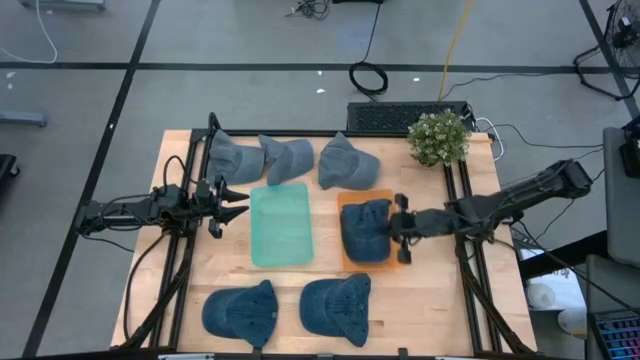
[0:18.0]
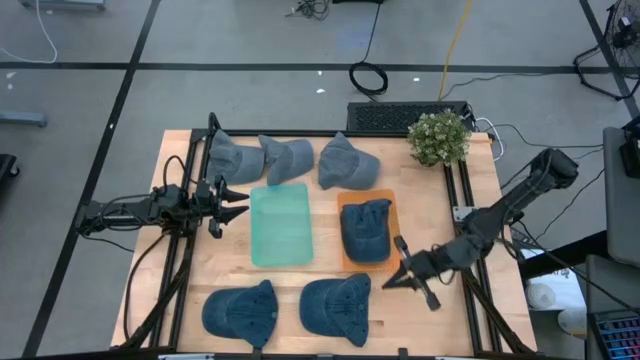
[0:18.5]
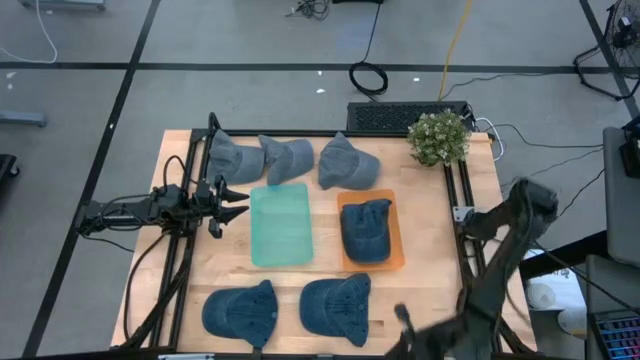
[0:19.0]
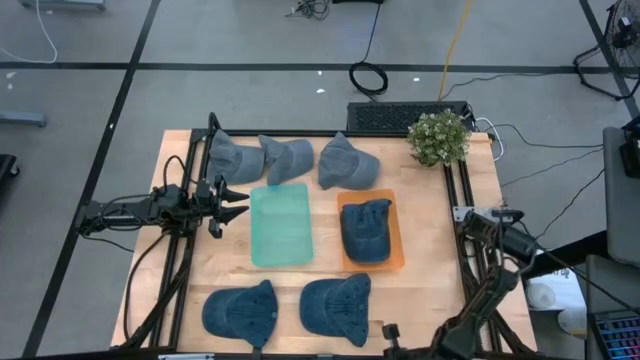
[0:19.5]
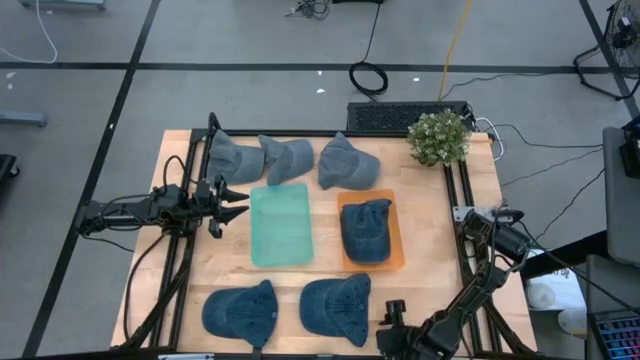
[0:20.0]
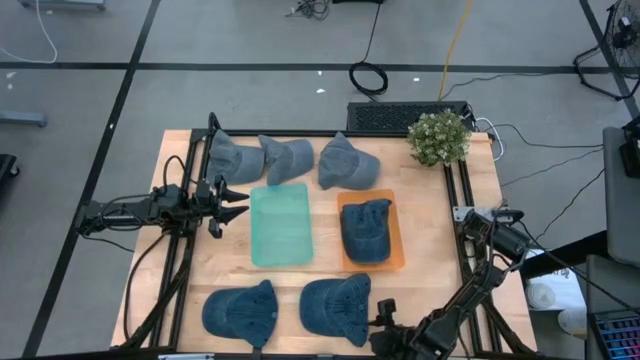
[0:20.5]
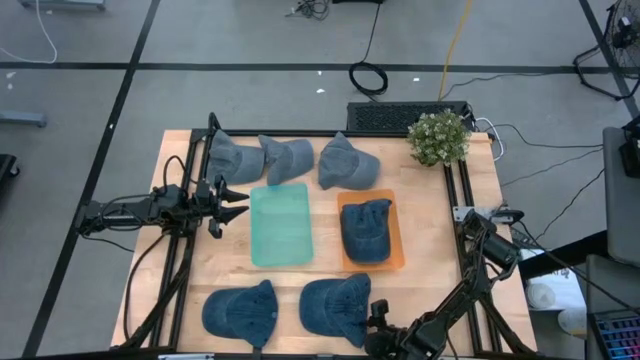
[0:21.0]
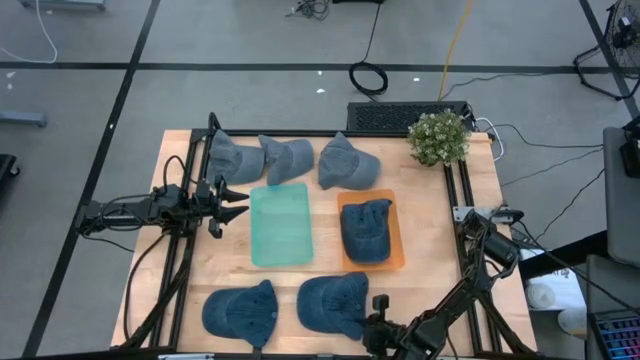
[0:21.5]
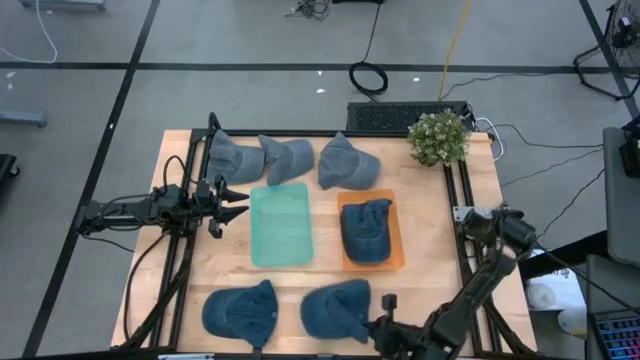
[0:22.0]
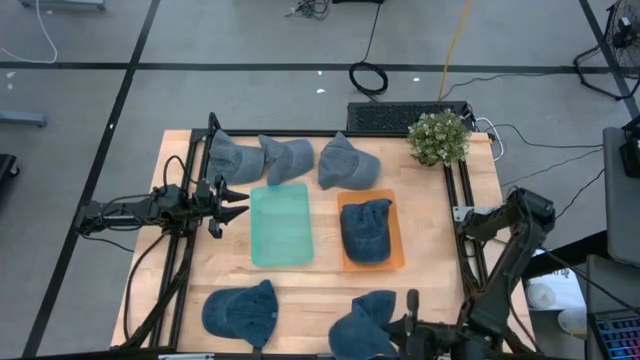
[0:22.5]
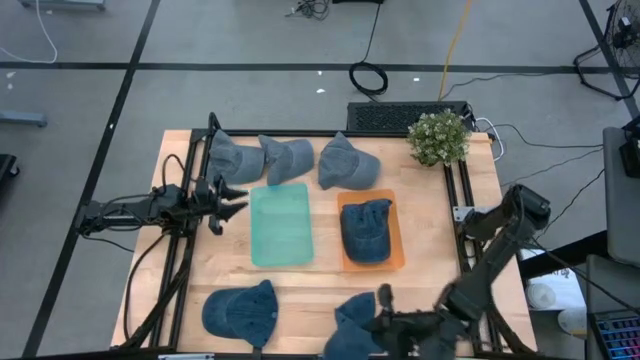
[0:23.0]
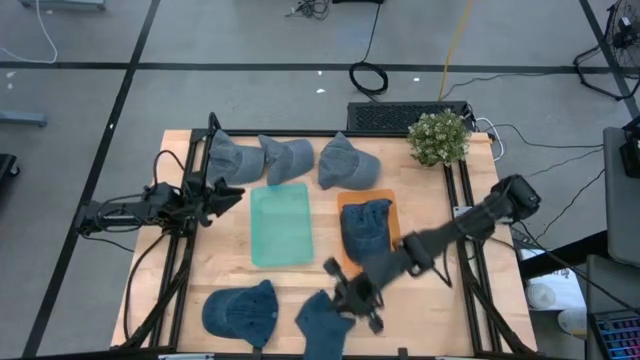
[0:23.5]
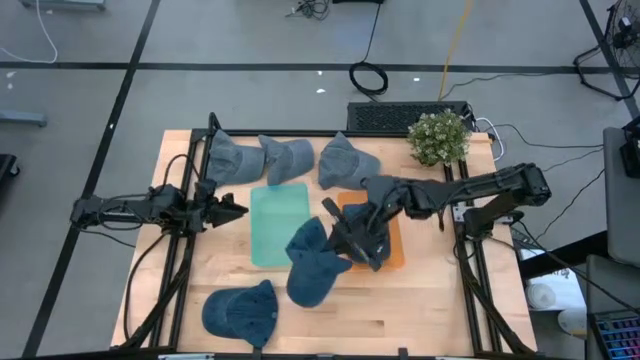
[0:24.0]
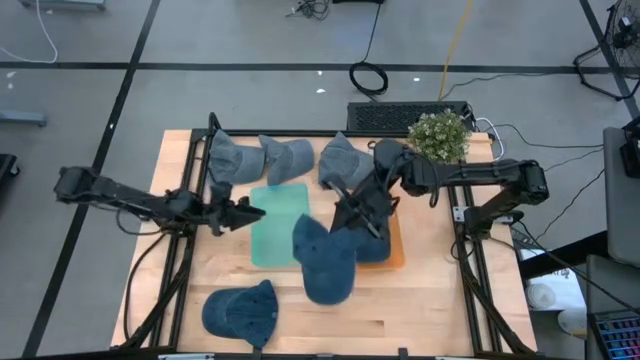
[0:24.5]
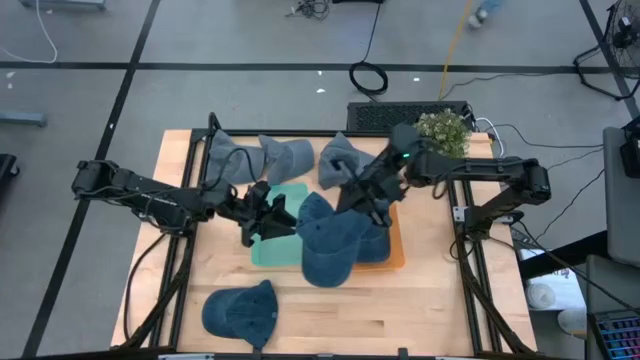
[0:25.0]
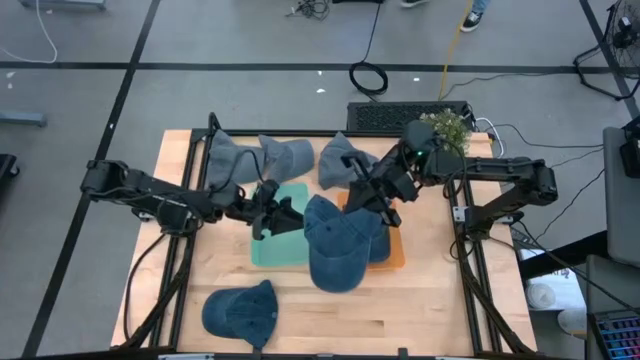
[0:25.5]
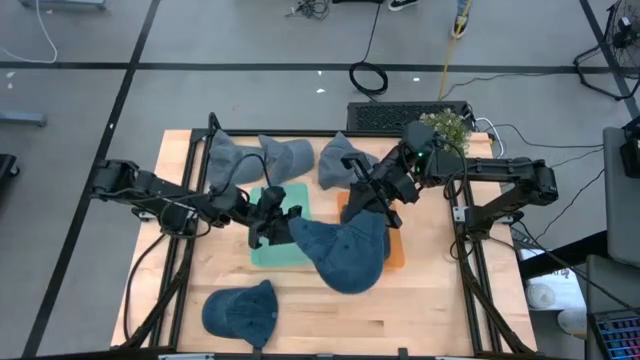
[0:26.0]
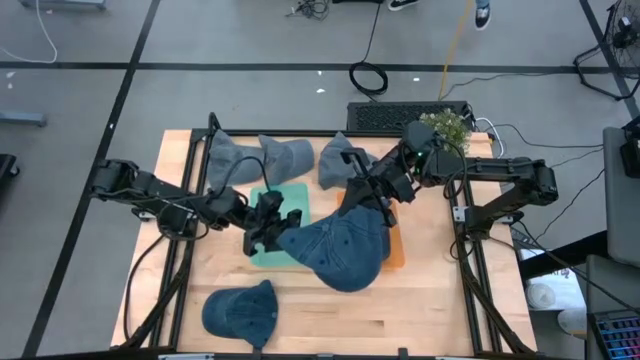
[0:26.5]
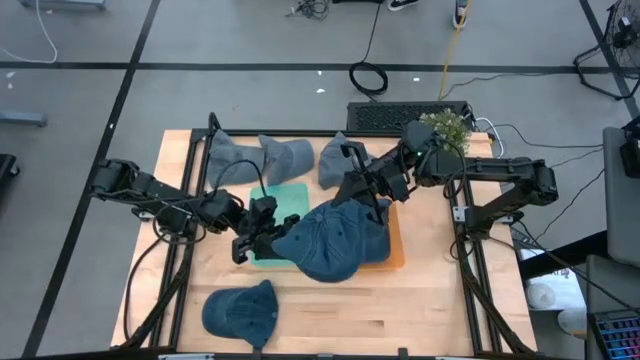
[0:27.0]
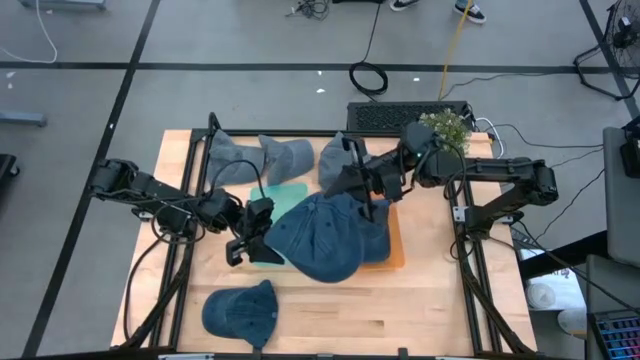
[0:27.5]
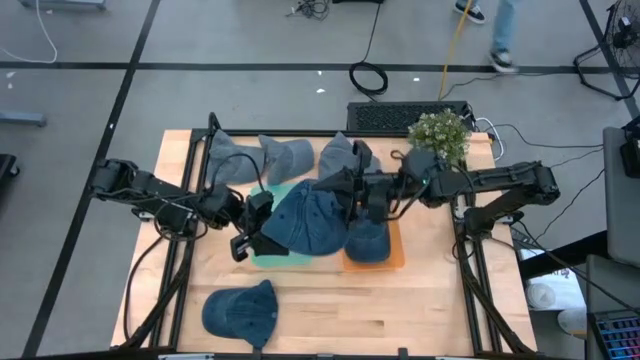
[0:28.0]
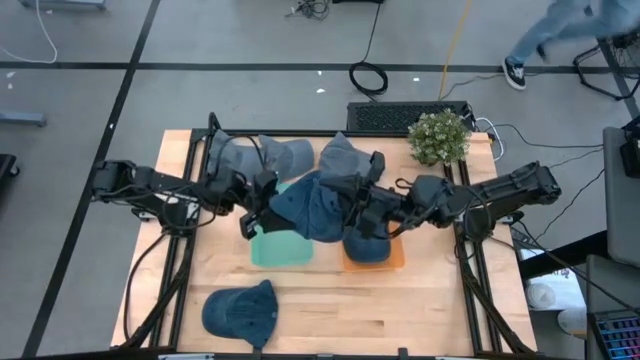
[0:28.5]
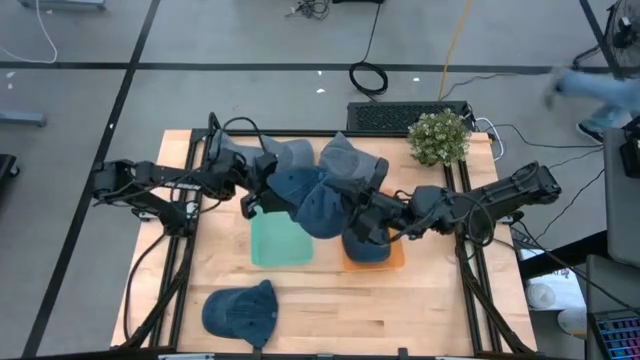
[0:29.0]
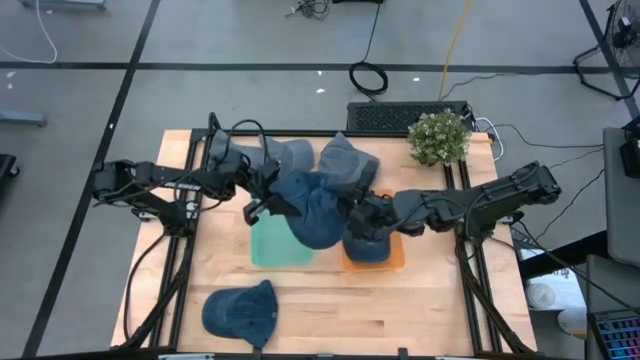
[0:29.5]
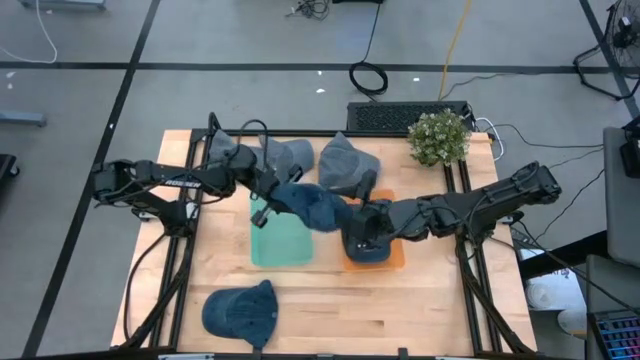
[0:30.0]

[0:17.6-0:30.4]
Task: Pick & Place hat
Put the right blue cap into the orange bin
